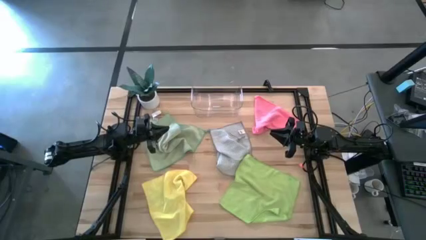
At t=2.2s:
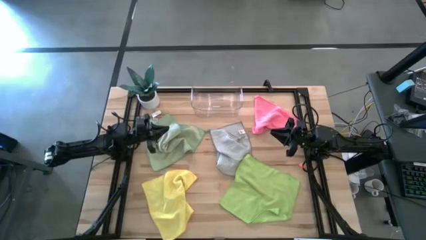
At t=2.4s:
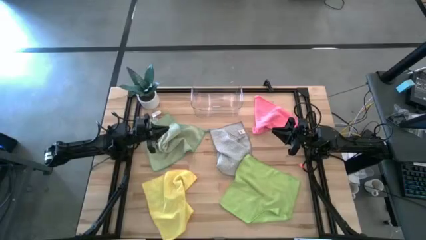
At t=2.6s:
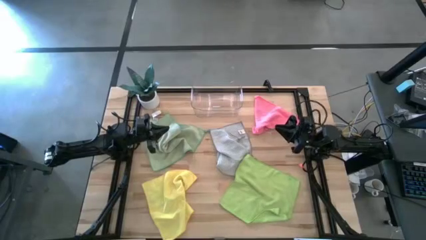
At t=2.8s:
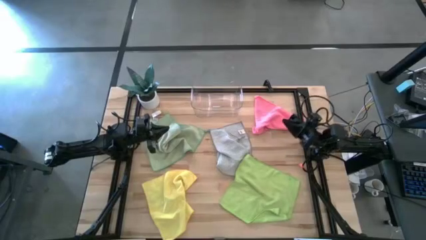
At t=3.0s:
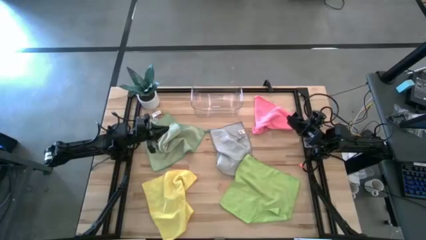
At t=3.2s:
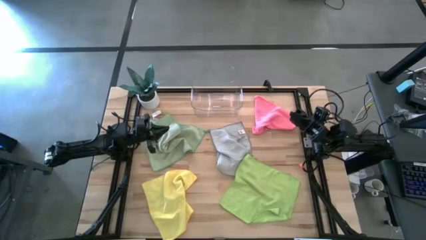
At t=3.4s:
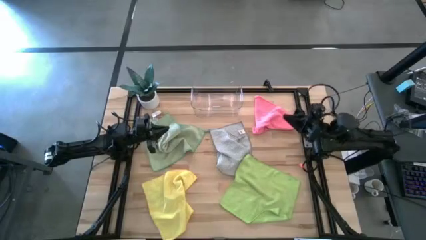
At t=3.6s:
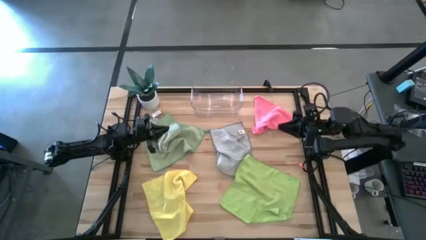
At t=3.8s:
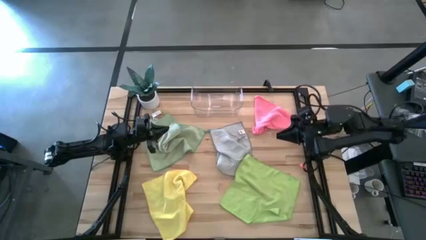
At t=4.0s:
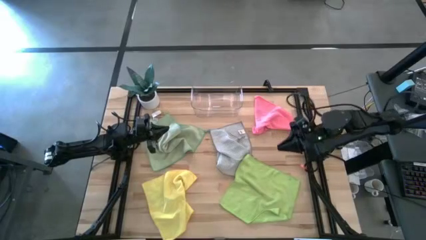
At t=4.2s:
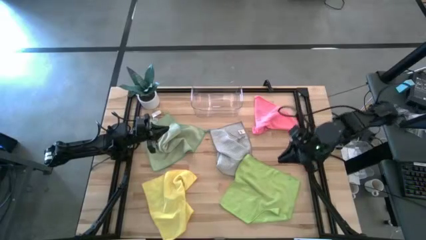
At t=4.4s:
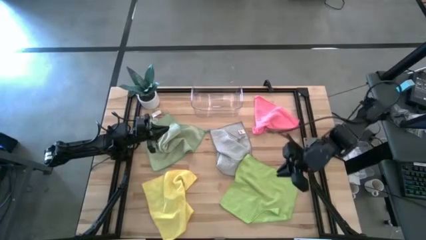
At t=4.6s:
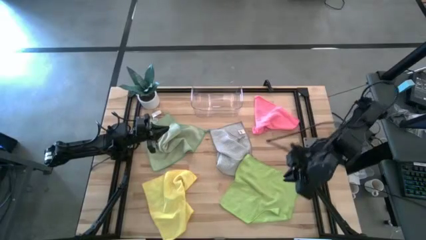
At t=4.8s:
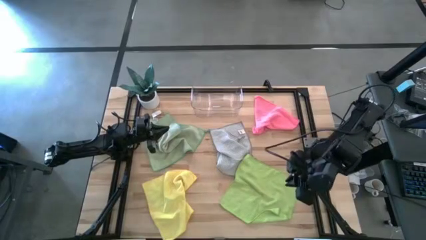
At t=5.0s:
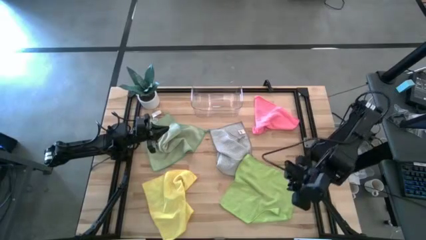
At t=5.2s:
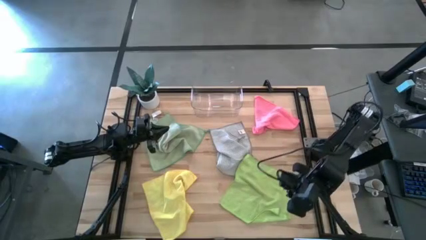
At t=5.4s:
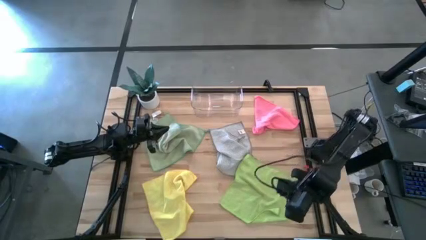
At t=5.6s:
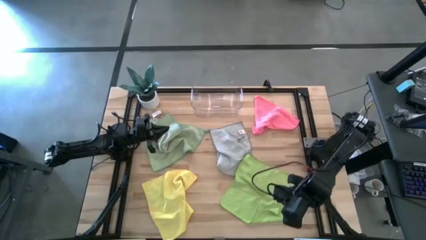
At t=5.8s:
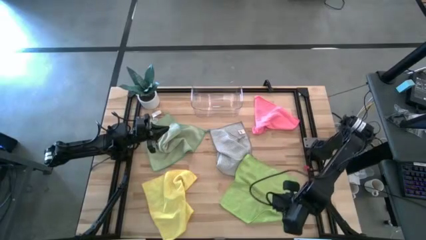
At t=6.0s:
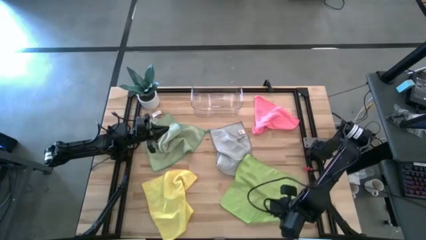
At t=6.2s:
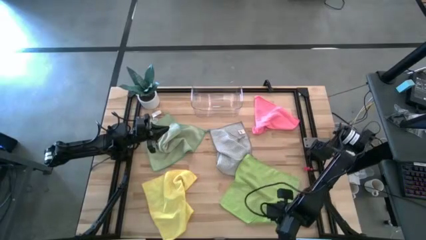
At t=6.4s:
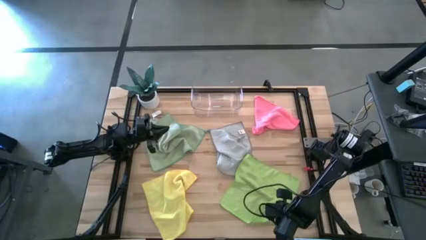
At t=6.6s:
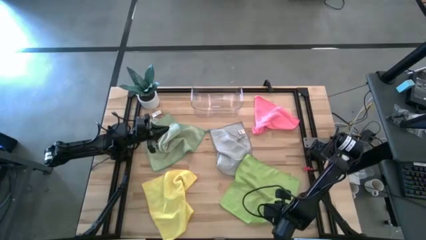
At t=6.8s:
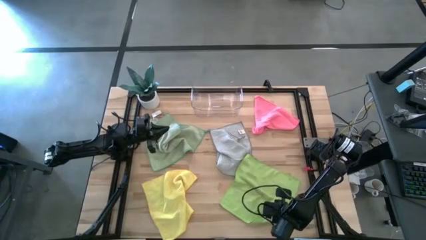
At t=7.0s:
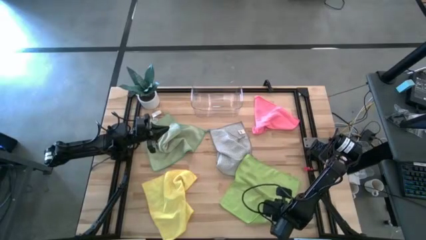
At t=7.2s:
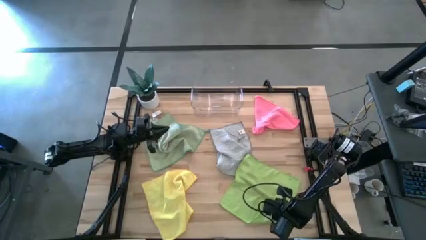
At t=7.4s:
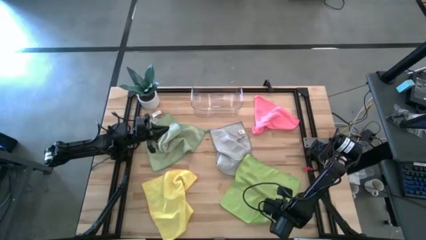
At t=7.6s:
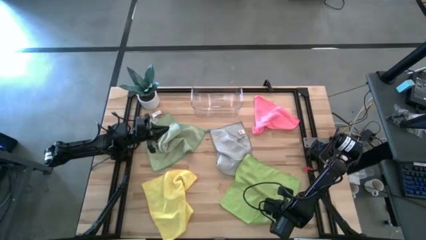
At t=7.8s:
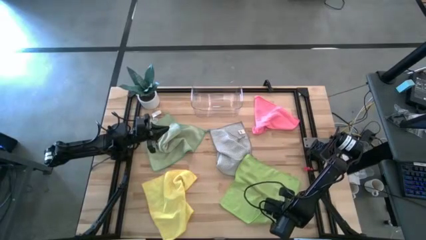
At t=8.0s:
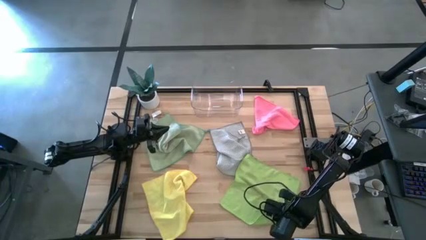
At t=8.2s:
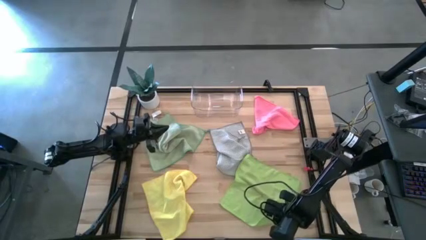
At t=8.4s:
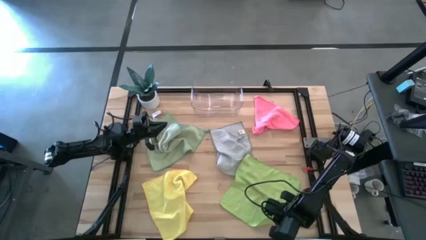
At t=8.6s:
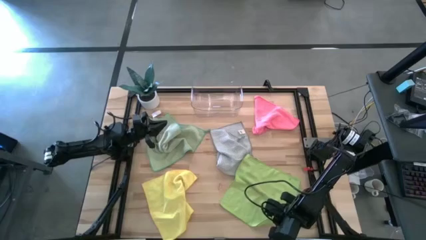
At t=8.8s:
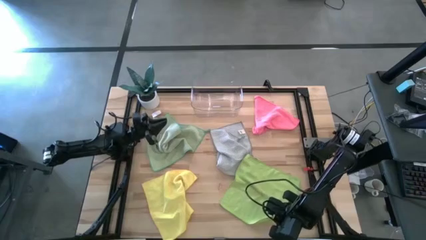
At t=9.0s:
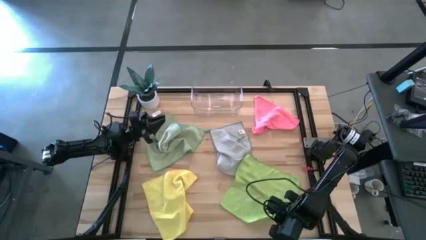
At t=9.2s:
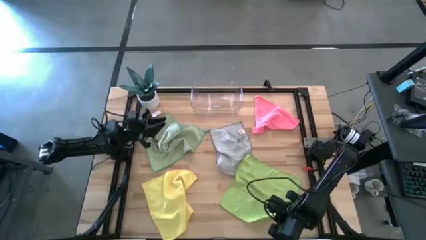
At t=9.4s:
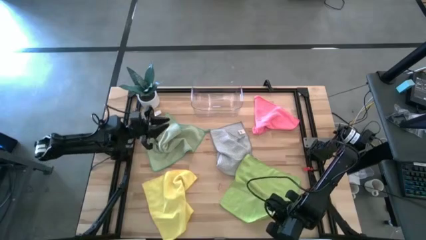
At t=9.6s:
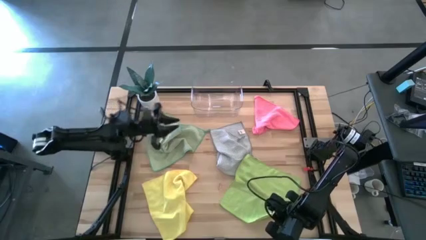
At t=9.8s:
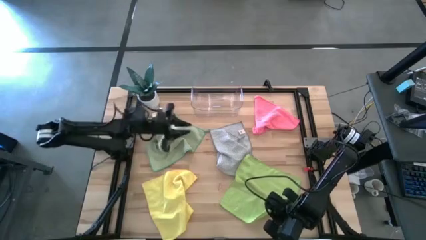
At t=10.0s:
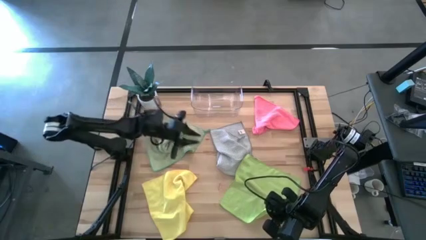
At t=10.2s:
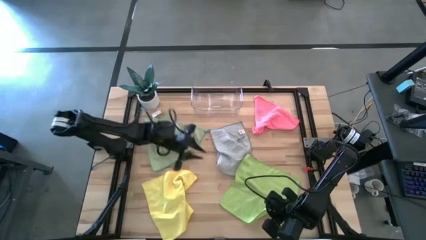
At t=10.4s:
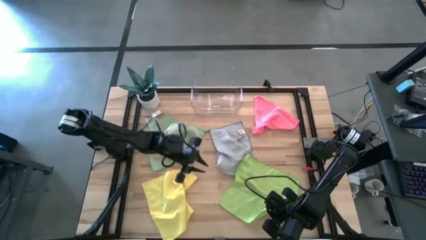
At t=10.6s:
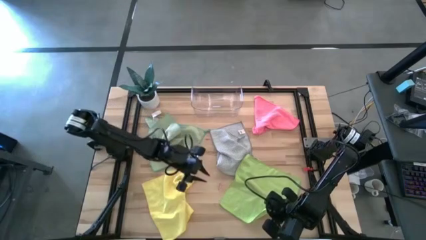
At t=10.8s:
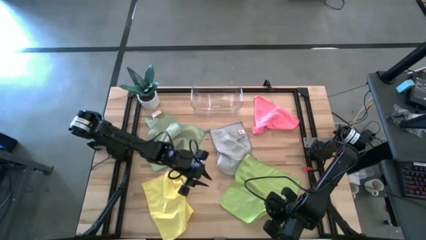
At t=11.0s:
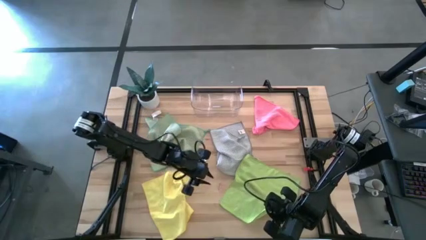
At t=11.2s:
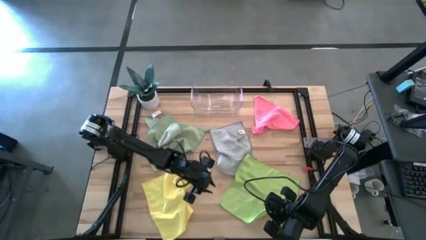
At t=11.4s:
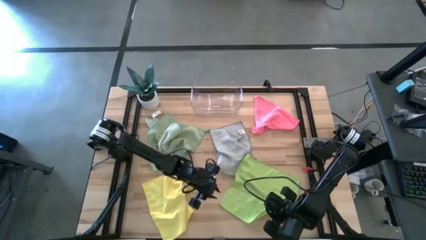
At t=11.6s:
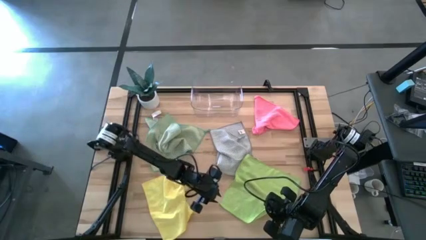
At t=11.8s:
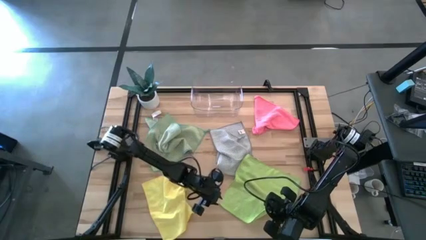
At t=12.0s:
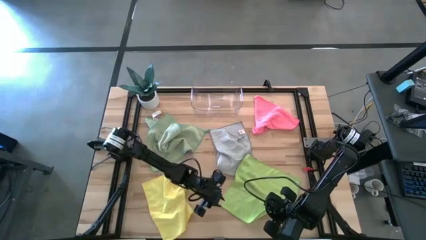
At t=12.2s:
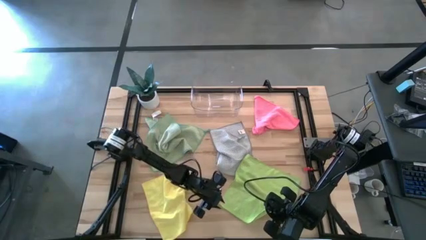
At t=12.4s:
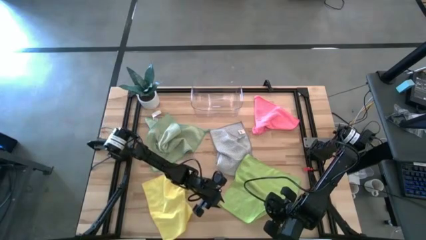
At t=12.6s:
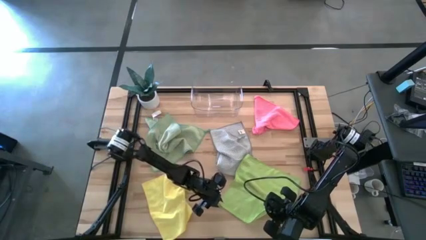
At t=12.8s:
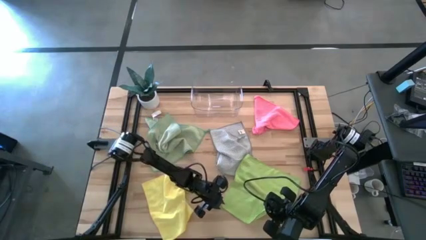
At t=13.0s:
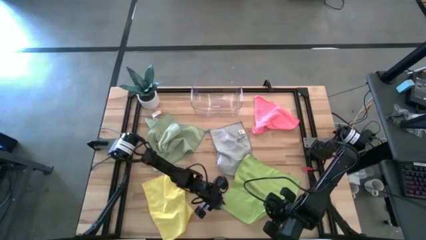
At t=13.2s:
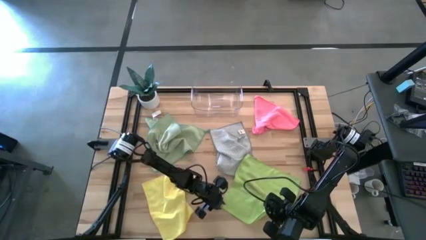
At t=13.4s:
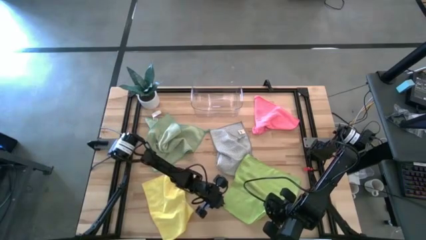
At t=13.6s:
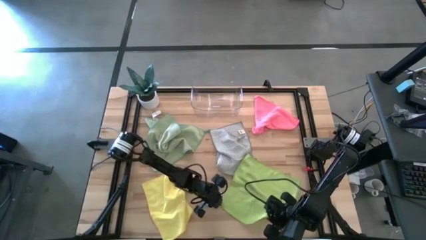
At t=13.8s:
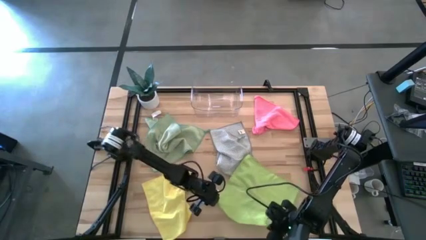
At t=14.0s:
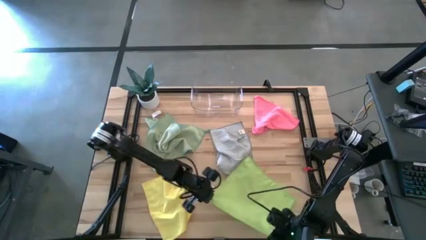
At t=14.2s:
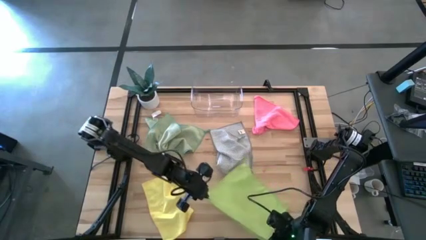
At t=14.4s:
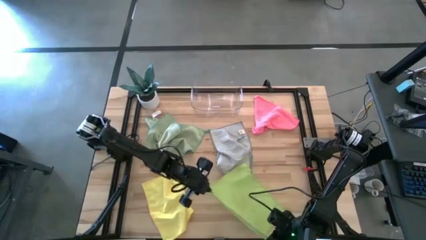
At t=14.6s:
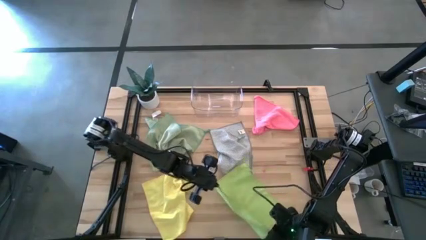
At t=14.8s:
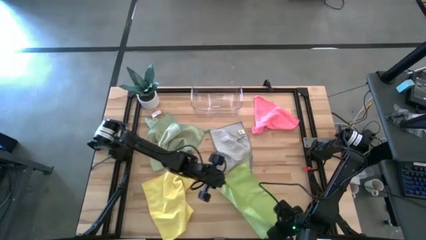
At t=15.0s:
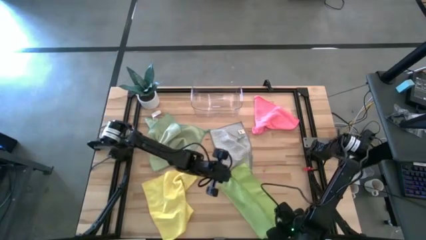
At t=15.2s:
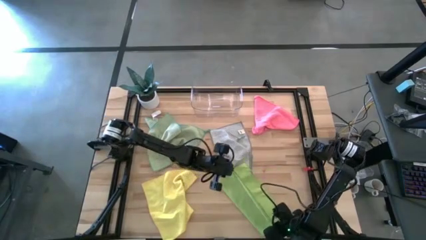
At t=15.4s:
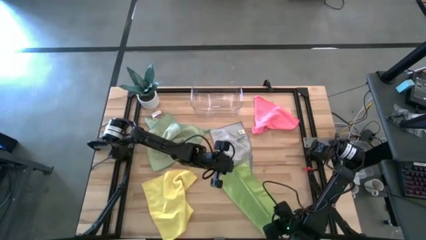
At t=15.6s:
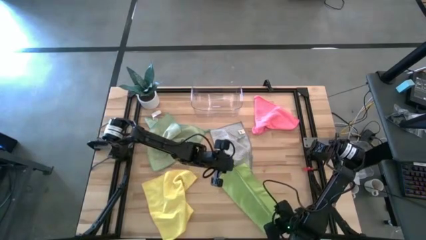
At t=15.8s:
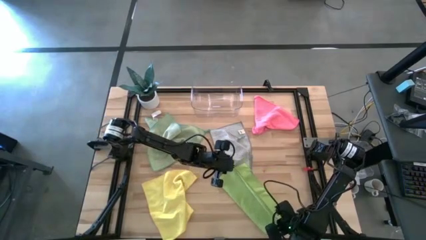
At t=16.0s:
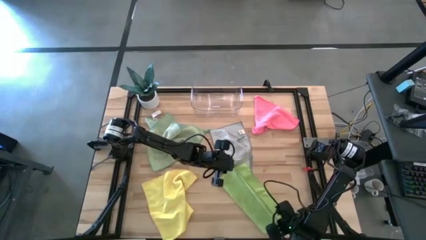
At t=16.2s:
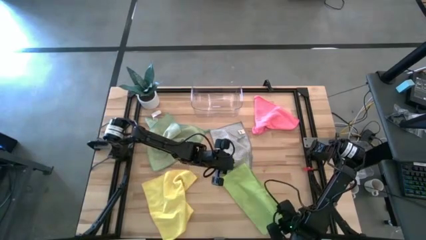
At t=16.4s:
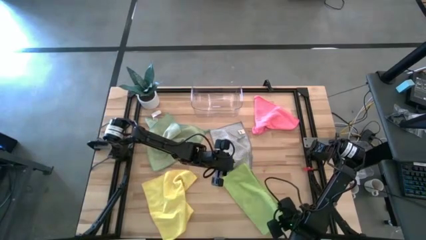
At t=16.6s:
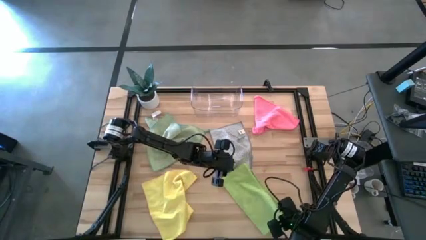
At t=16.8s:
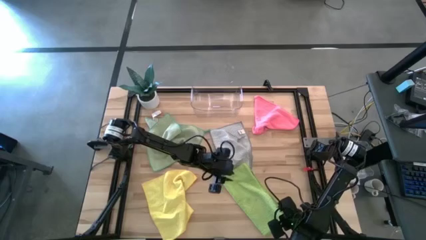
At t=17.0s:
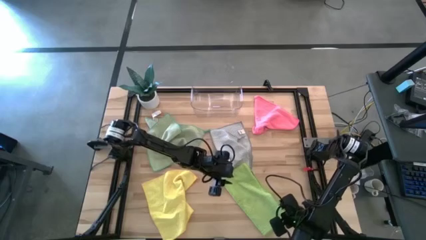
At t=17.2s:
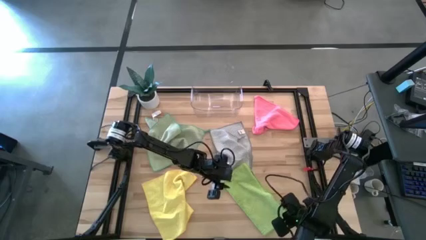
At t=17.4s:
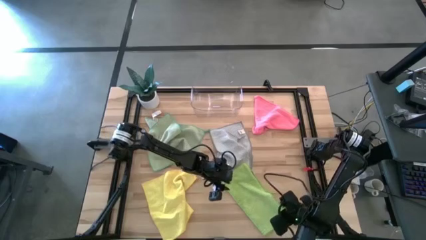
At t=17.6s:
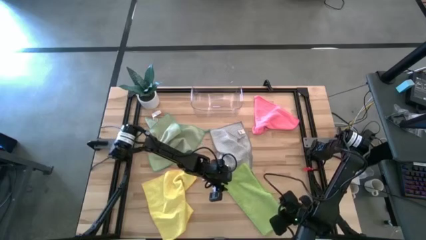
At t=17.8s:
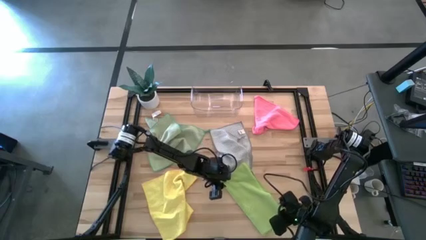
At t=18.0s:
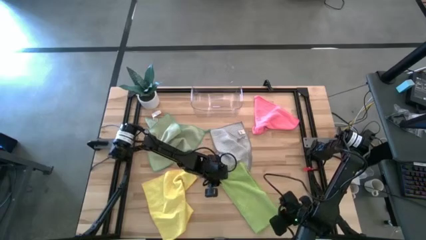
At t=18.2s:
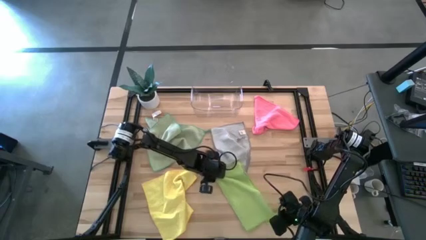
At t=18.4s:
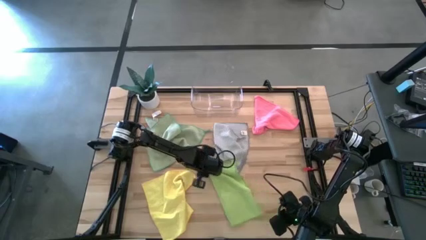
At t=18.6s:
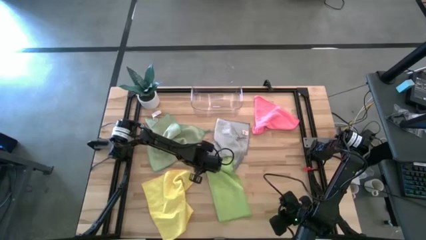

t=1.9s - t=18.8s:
Task: Fold microfiber towels
Fold the green microfiber cloth
